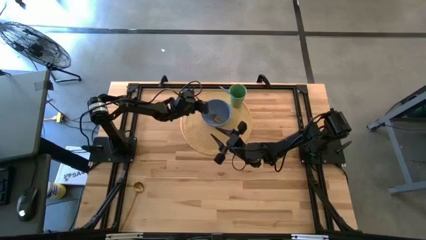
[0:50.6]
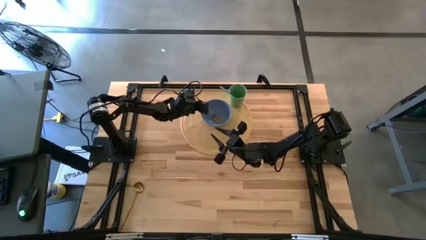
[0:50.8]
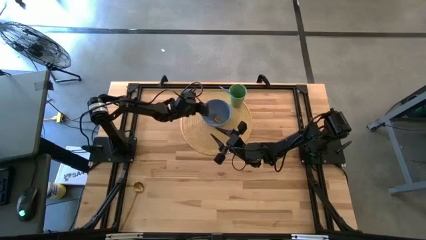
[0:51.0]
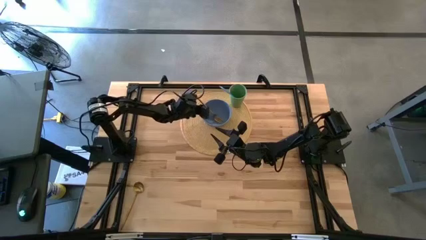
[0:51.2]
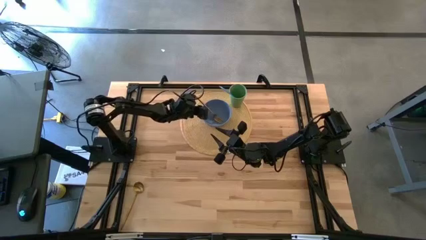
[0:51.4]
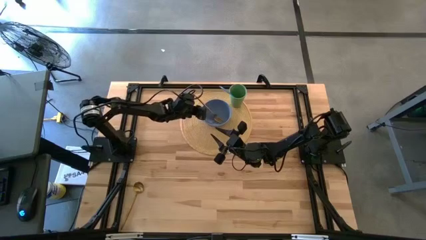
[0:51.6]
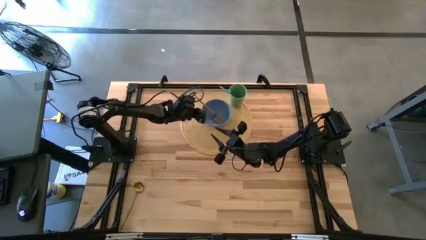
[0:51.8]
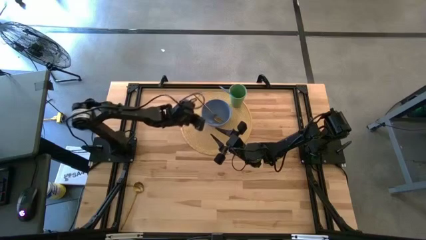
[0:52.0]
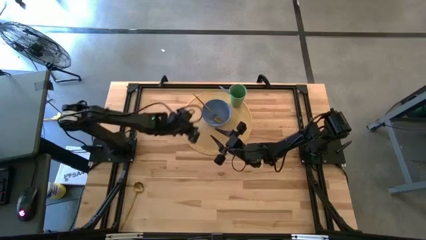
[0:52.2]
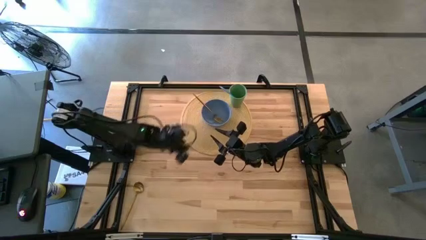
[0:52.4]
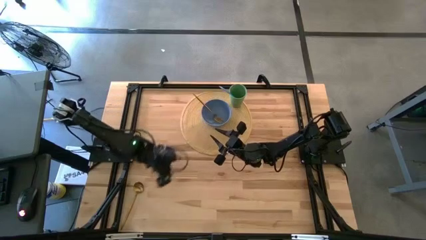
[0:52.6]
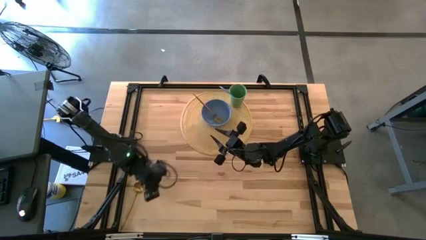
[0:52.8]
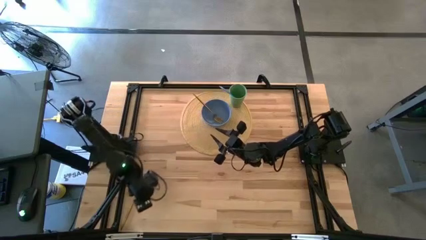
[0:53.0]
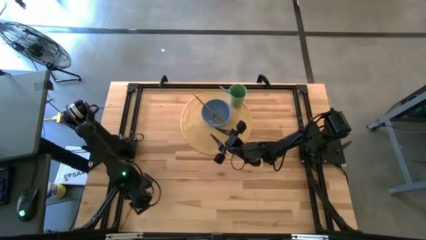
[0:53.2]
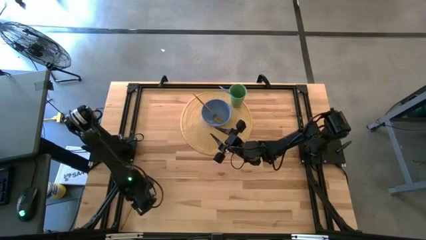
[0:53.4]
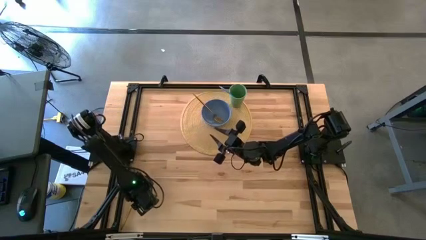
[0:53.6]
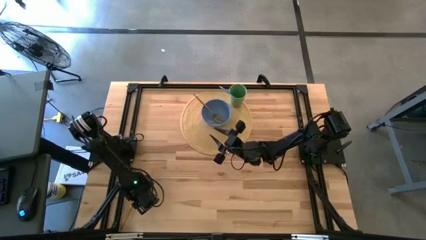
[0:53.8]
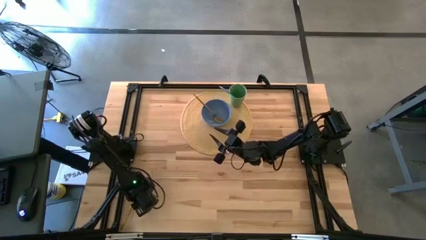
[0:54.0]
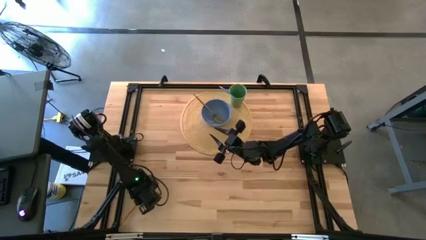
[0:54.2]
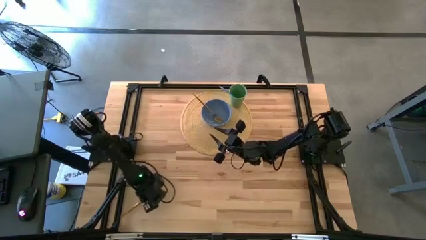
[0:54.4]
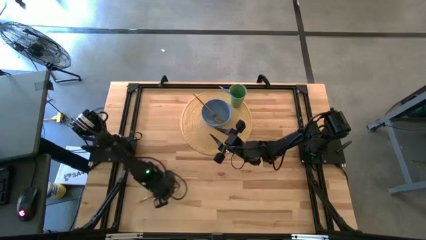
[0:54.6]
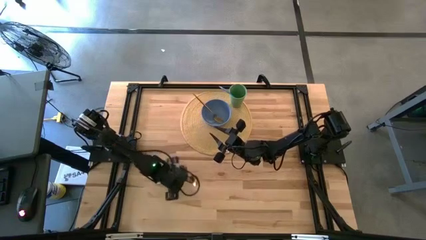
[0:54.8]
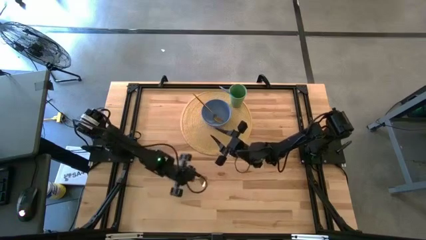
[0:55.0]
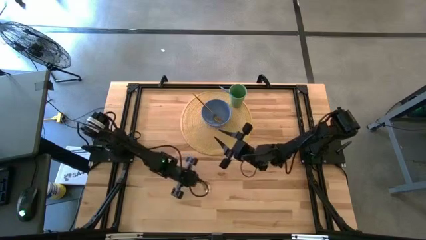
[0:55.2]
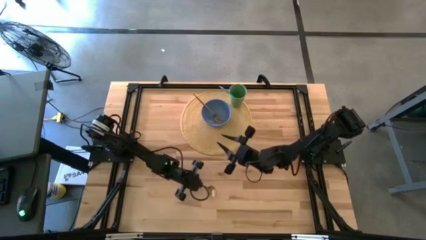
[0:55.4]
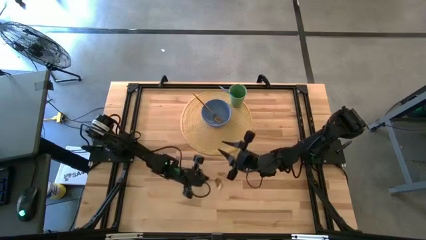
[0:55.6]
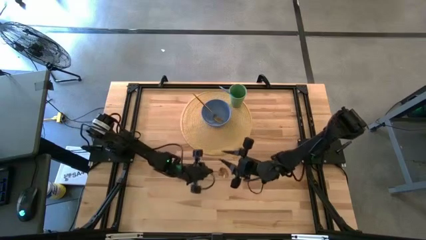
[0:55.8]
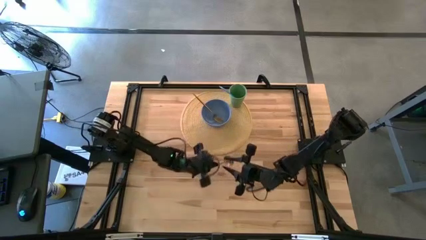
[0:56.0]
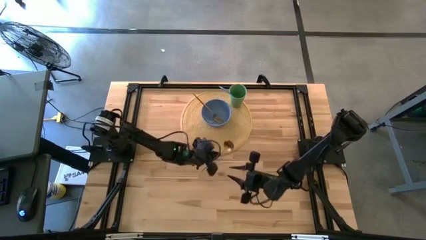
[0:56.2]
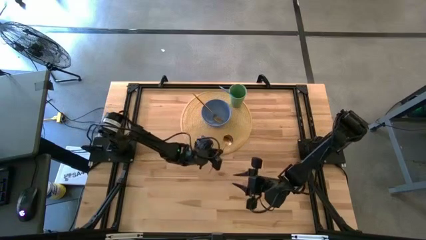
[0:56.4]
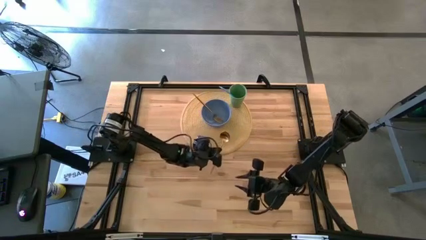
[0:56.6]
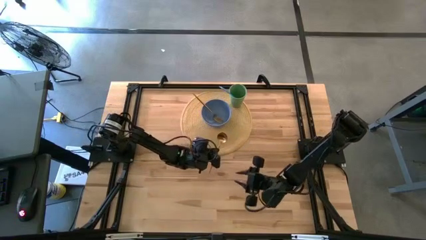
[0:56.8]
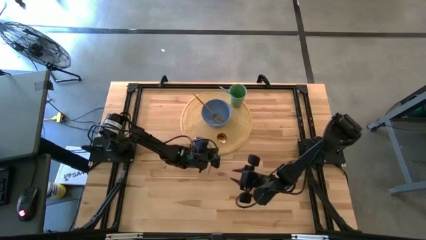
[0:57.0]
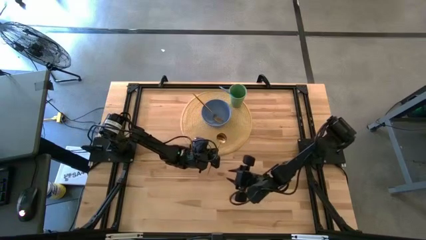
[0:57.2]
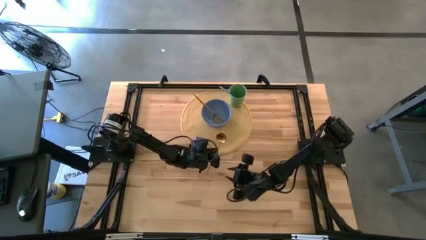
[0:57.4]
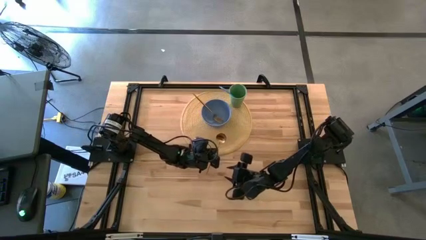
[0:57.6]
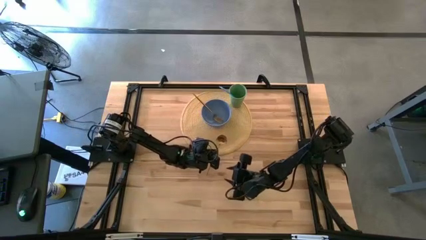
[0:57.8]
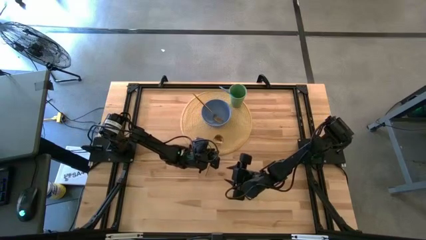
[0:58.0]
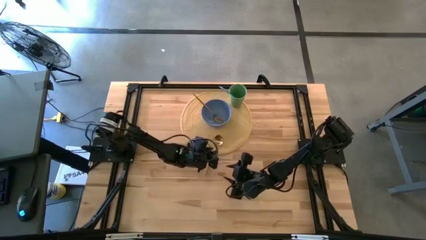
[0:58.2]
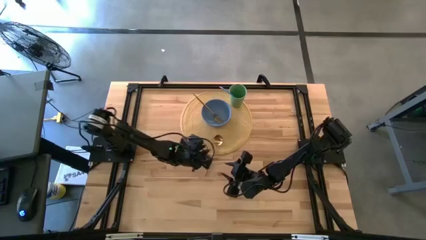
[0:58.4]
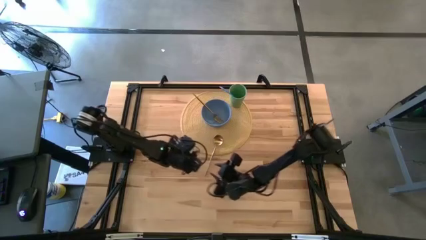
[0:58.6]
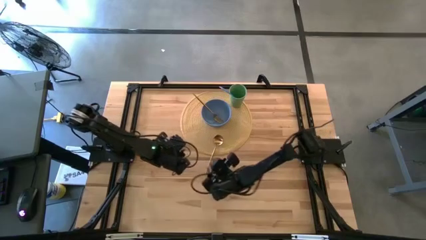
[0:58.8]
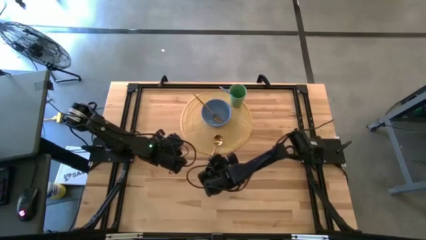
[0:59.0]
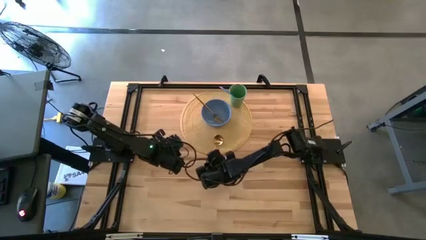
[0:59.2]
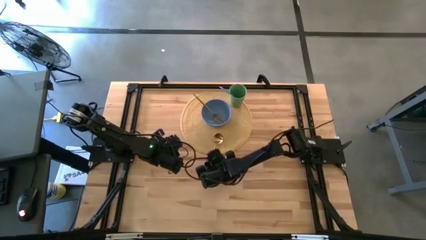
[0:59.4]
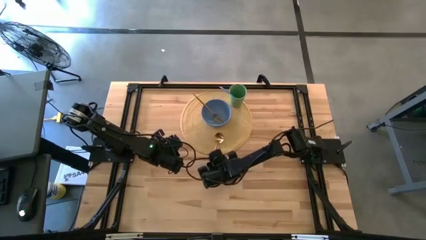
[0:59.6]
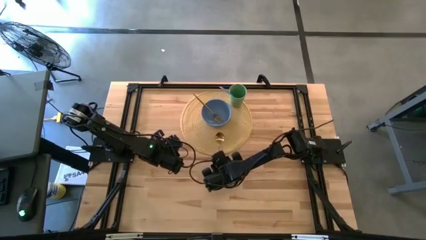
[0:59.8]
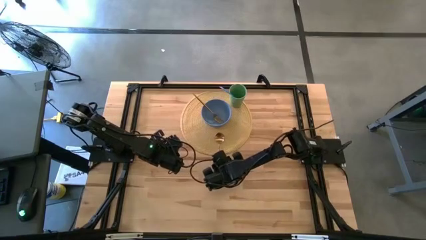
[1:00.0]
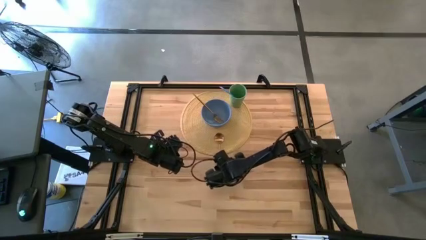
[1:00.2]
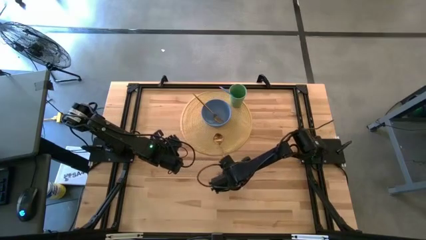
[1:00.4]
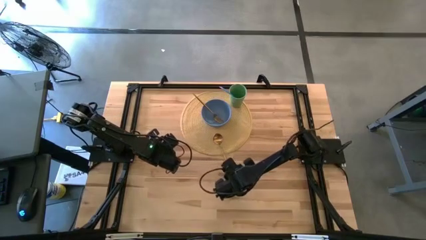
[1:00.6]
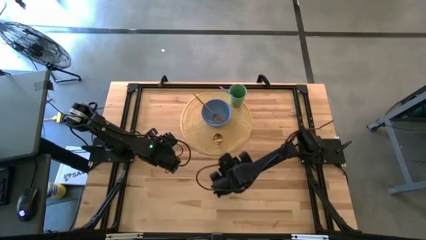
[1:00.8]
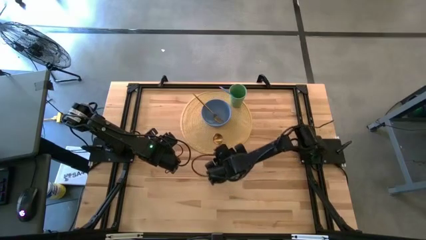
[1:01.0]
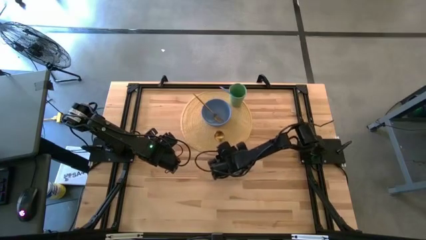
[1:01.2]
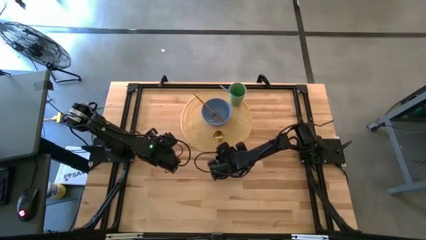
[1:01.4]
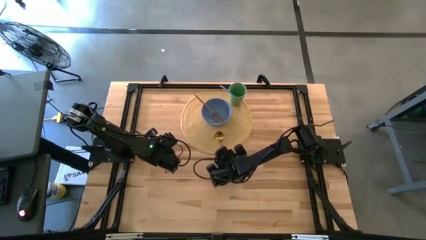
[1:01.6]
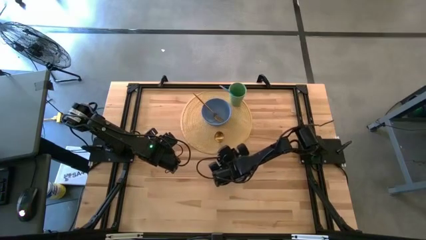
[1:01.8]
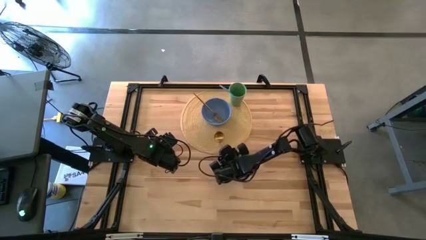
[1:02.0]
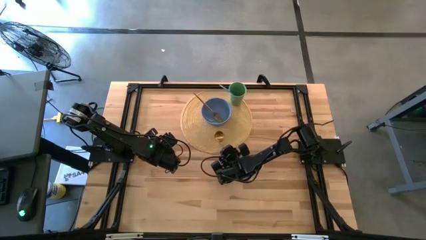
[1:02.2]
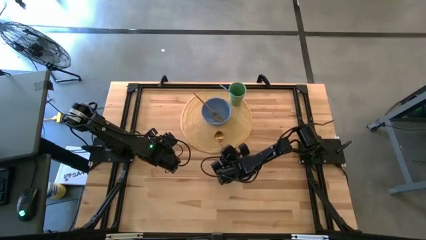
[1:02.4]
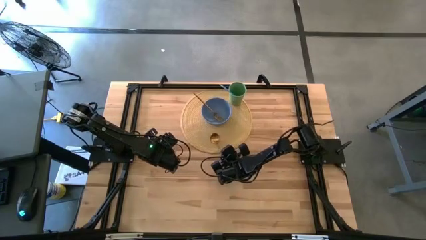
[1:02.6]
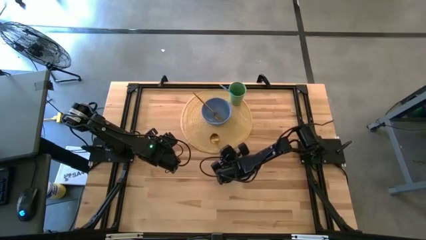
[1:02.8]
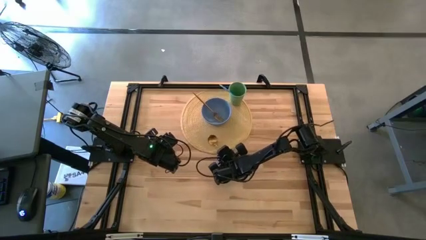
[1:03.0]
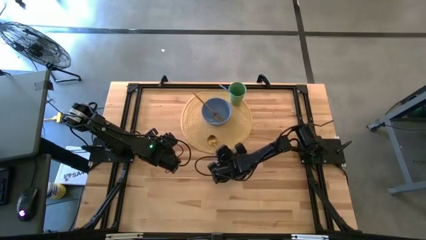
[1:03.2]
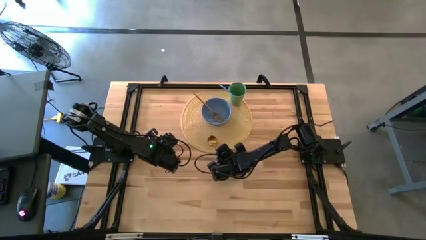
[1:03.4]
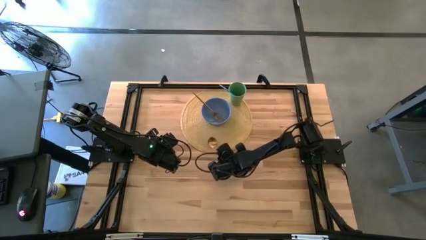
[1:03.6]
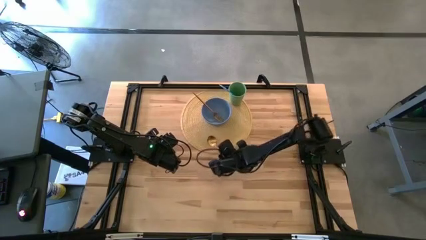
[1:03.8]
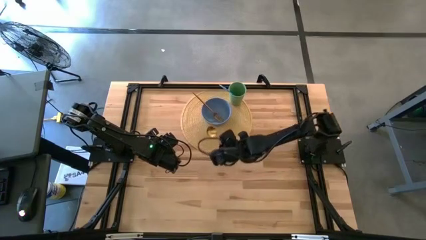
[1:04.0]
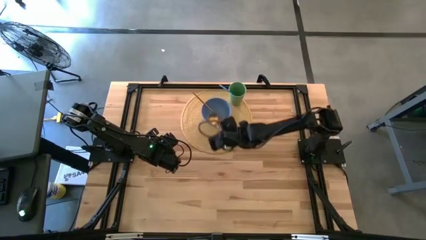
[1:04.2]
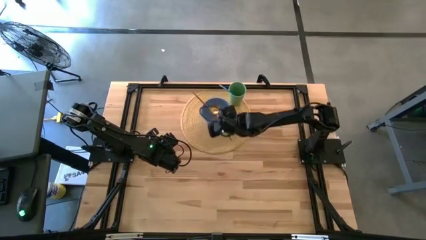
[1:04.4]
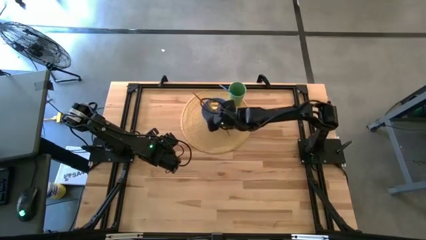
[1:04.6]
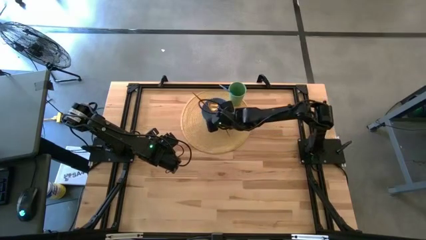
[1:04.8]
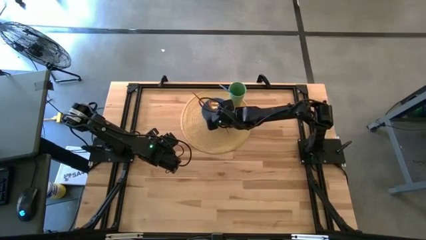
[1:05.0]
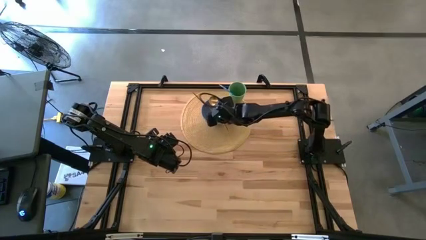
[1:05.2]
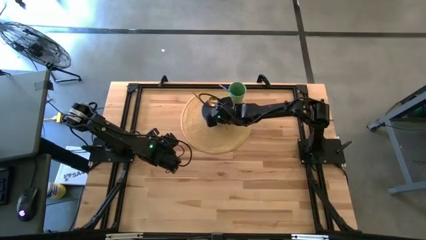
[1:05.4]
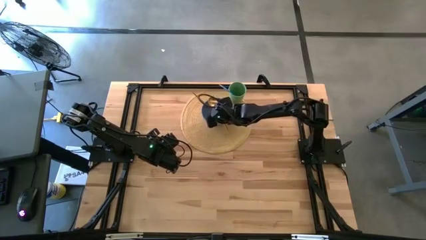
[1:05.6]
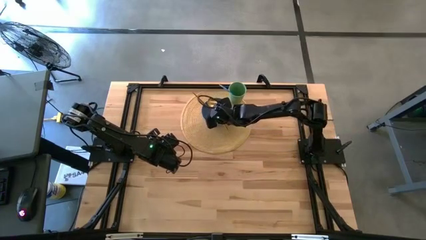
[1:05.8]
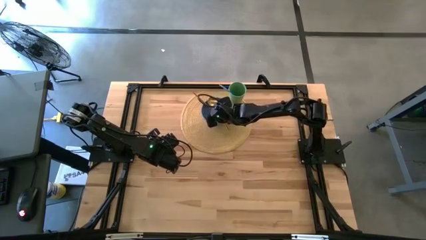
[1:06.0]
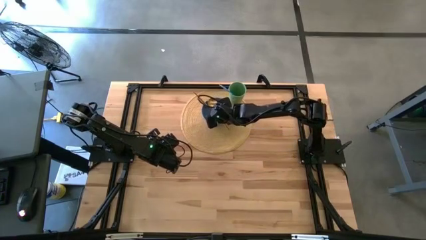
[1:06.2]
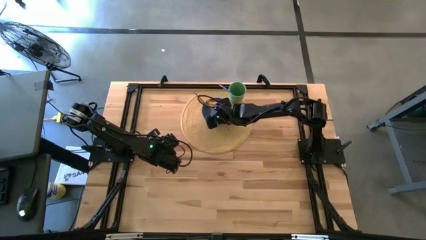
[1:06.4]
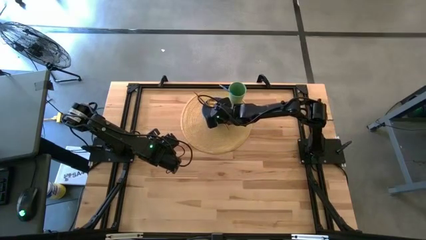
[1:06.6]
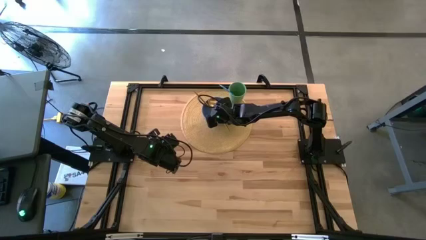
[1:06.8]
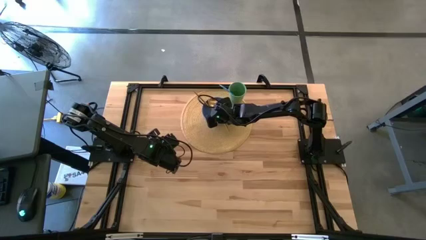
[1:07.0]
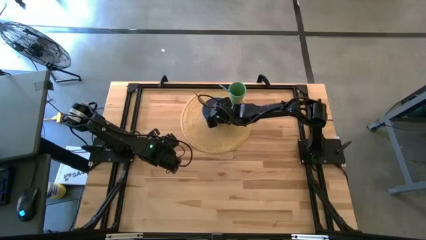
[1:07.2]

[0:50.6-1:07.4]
Task: Pick & Place Utensil
Put the gold spoon into the blue bowl on the brown mat
